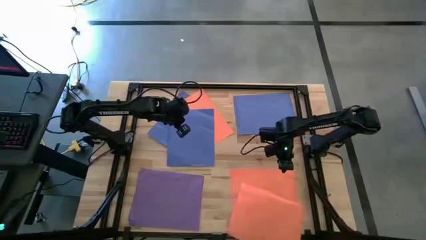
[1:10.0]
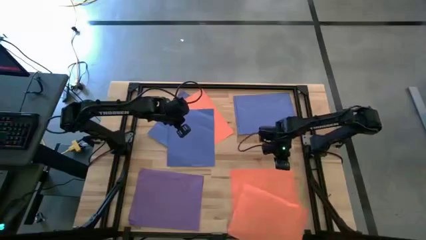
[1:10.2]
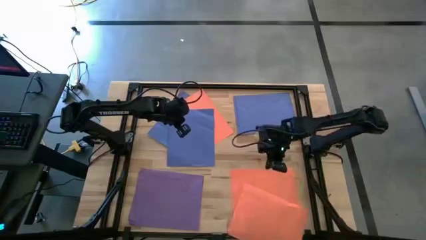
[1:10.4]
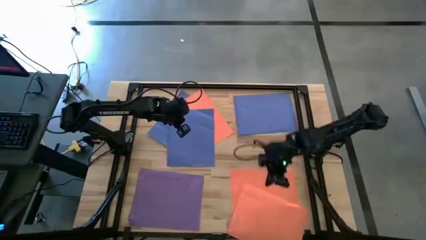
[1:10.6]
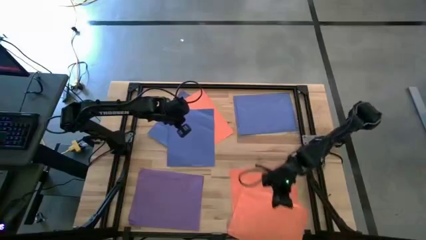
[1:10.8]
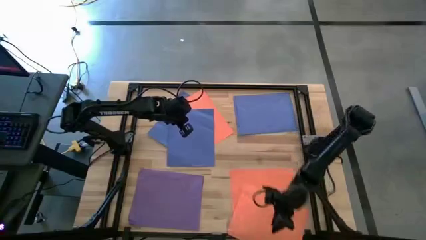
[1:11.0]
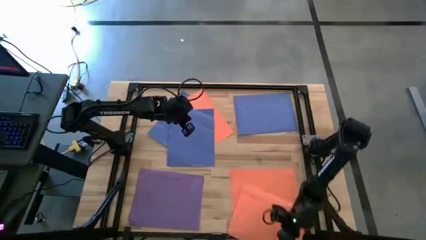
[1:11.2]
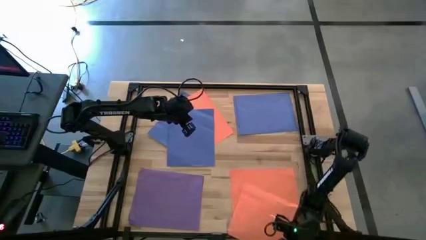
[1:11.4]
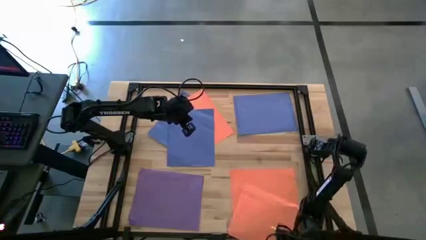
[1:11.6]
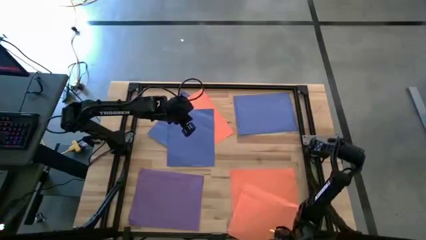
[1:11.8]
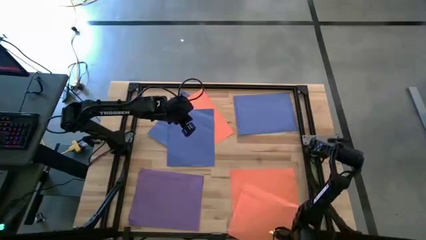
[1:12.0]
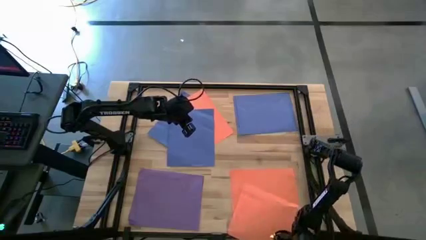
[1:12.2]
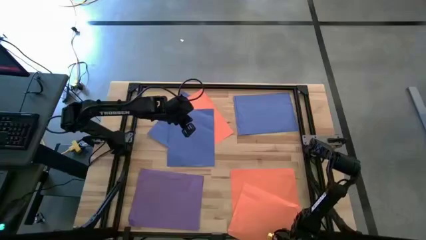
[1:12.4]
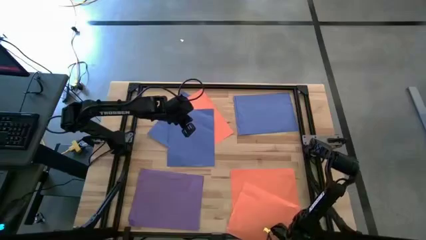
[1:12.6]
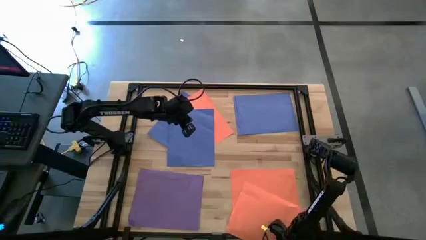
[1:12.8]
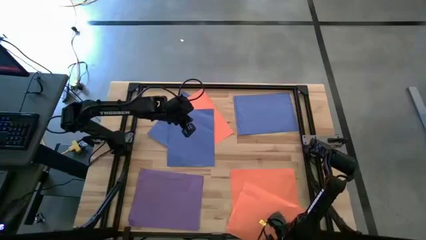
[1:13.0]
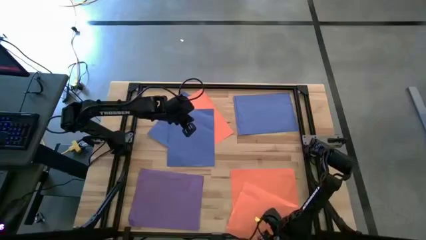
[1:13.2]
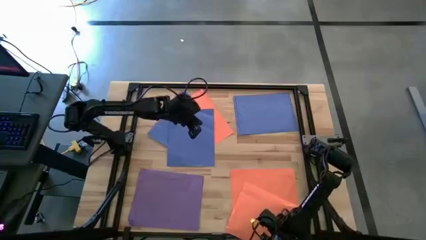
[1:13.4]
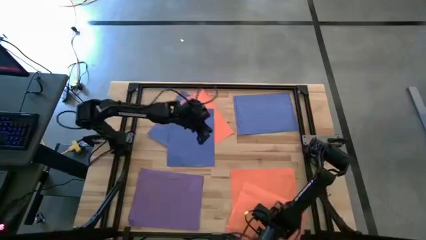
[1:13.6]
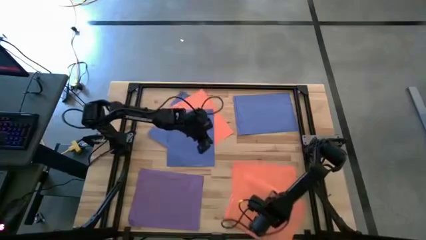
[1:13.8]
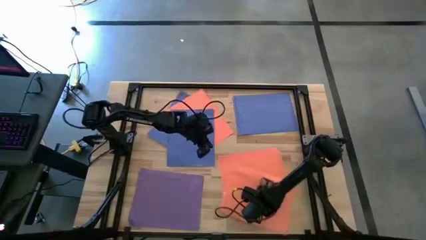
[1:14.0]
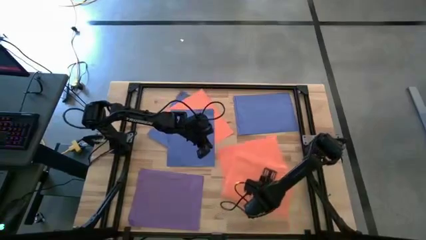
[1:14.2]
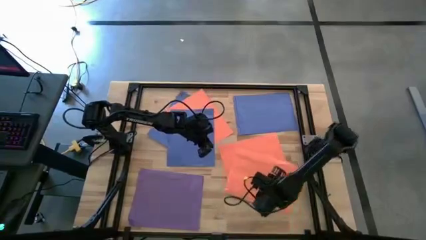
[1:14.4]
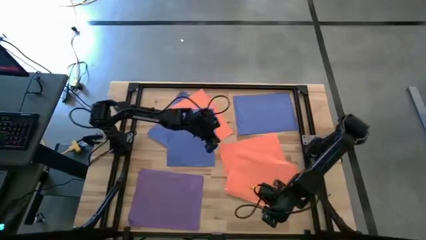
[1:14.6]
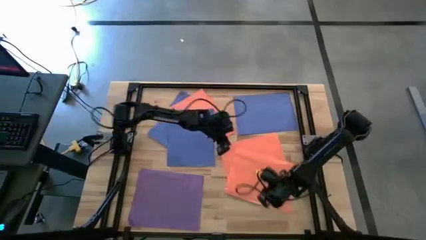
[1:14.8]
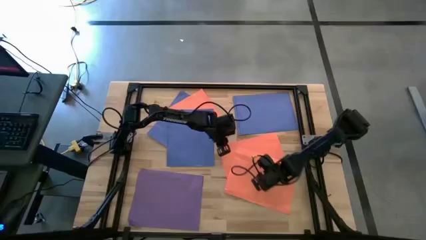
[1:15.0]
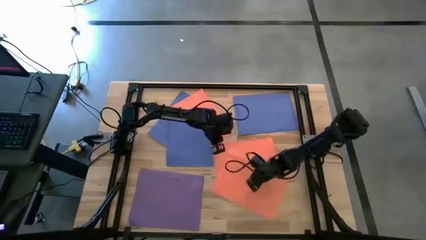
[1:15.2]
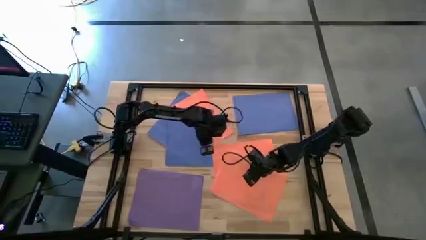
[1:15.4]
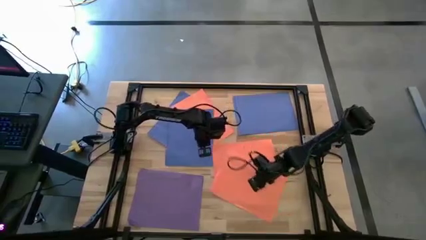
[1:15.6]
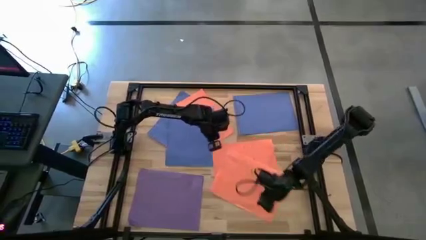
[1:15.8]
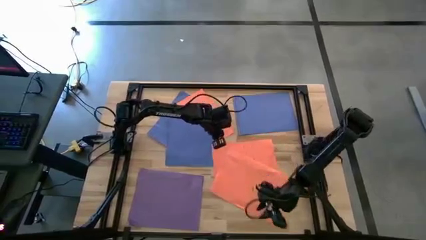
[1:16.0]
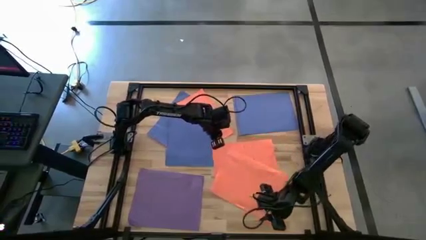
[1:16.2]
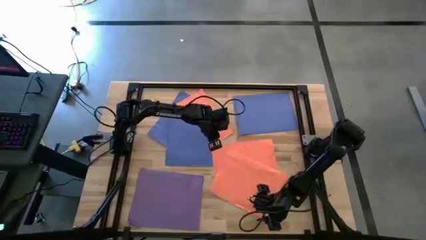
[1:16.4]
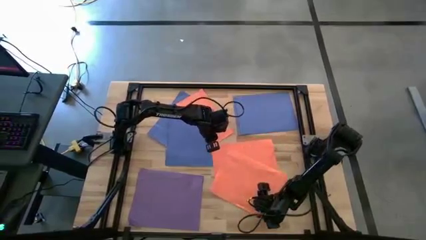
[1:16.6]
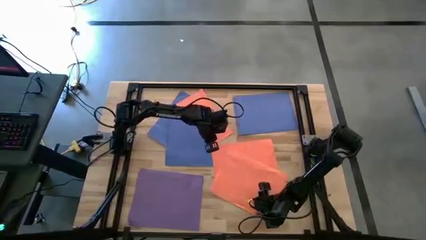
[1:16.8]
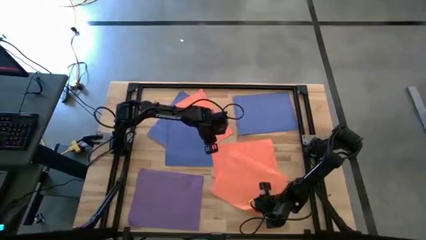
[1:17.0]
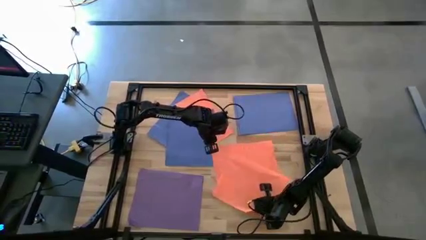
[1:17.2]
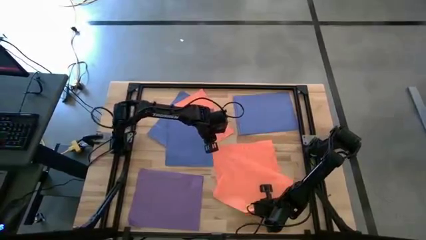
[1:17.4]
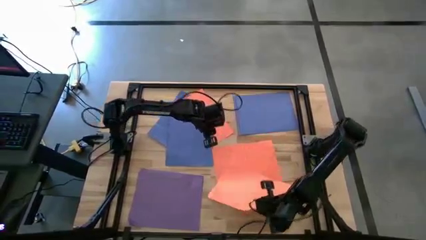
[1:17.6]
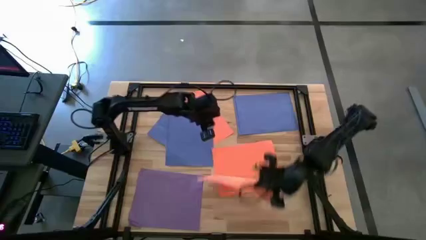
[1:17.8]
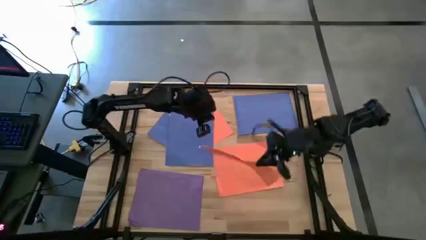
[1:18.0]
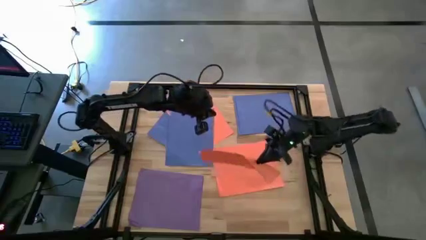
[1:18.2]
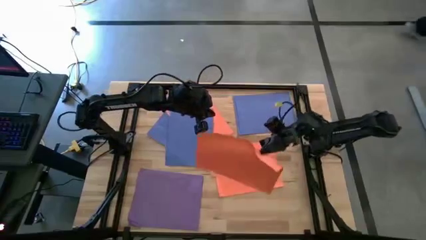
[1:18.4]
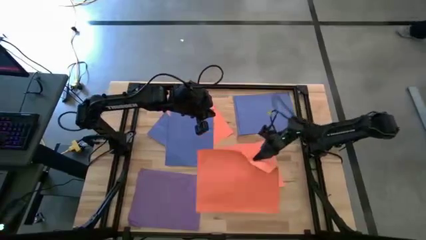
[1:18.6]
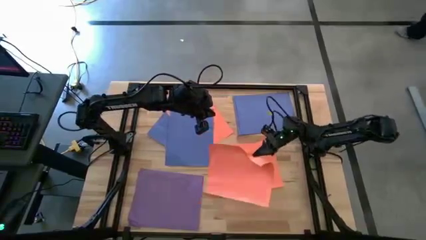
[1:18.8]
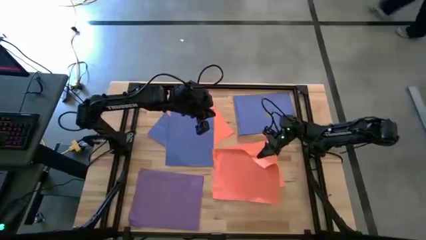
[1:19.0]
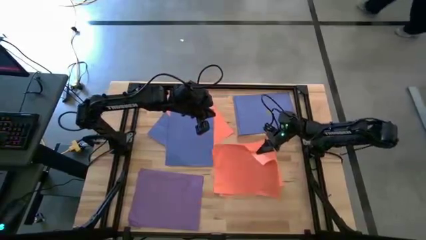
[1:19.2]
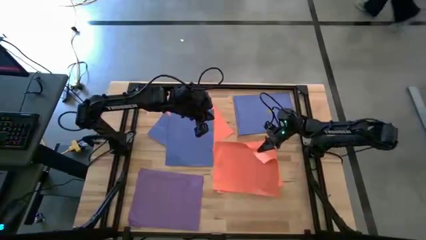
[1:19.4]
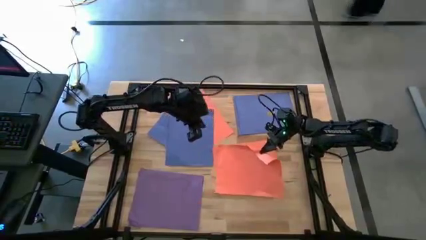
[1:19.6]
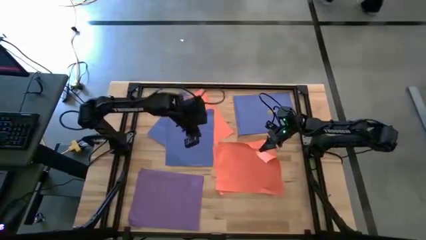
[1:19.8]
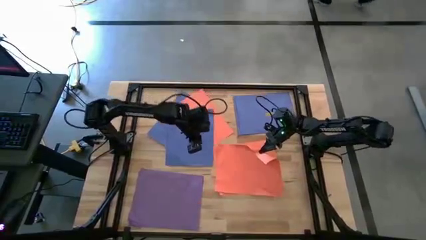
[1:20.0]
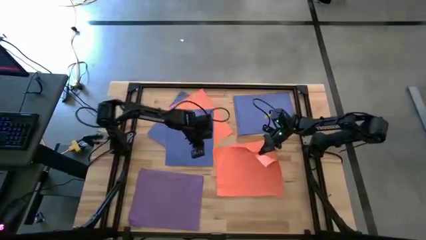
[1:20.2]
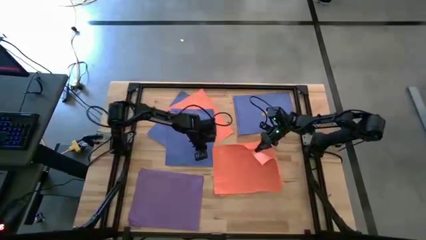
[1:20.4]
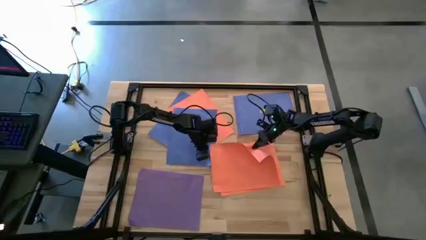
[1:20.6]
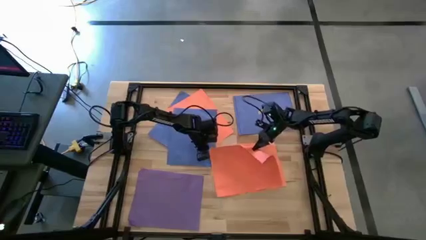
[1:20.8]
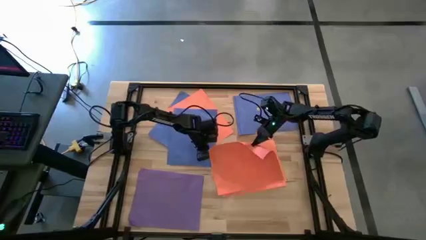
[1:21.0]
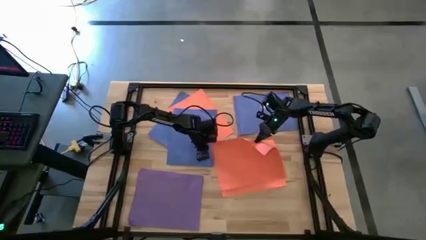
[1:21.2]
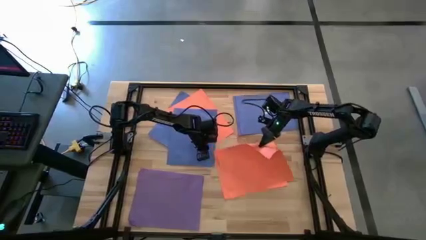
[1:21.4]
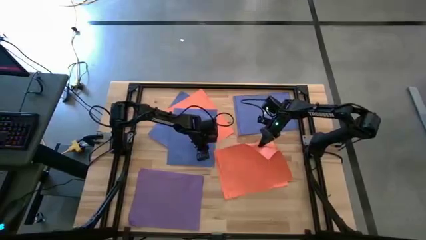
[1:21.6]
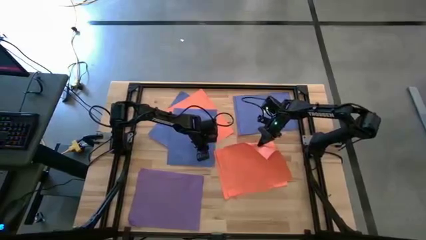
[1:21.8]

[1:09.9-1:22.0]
Task: Organize paper
Stack the orange colored paper on top of the orange colored paper

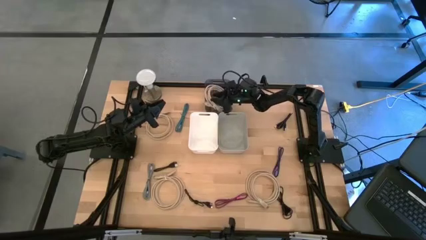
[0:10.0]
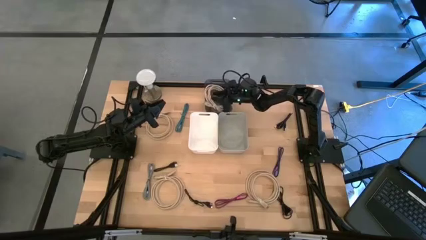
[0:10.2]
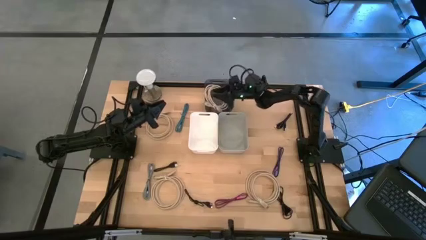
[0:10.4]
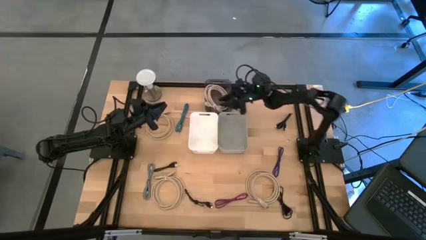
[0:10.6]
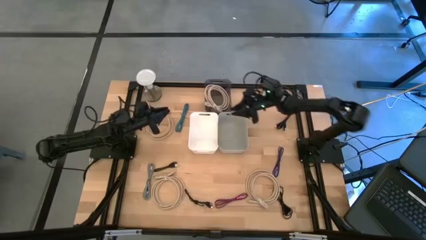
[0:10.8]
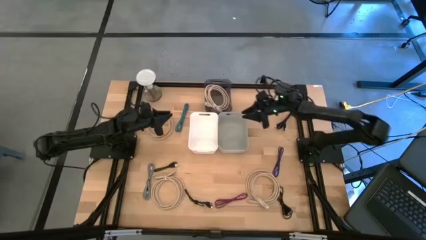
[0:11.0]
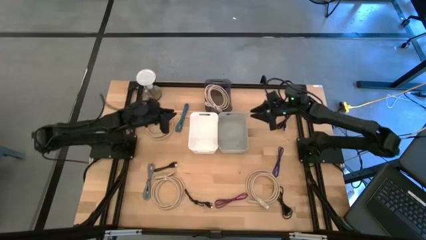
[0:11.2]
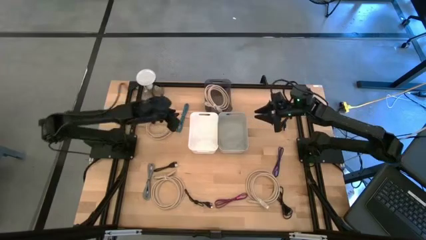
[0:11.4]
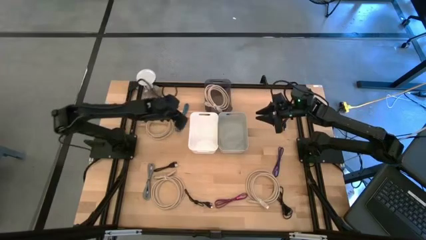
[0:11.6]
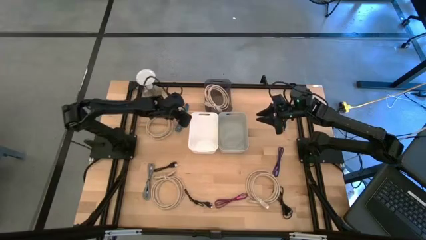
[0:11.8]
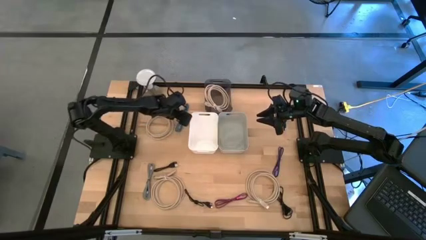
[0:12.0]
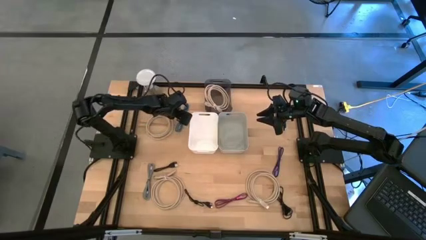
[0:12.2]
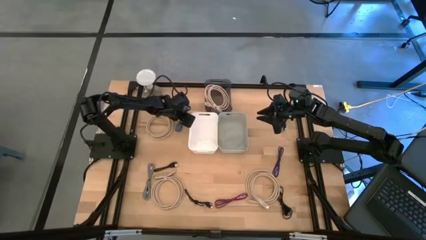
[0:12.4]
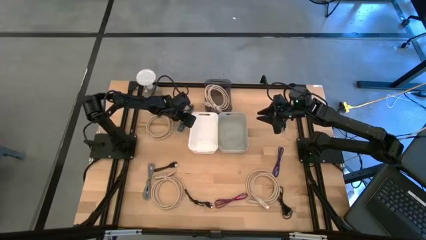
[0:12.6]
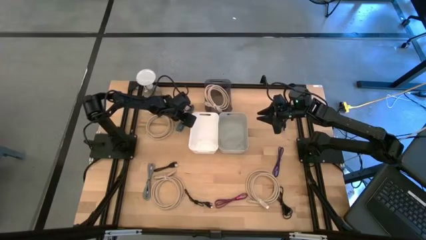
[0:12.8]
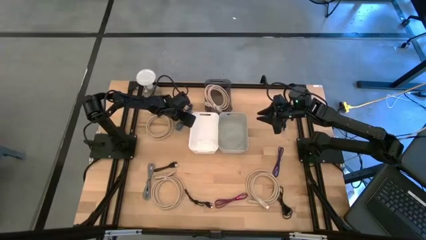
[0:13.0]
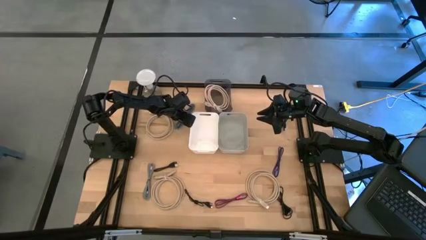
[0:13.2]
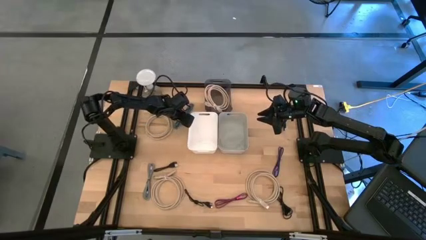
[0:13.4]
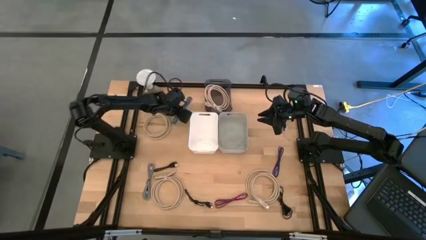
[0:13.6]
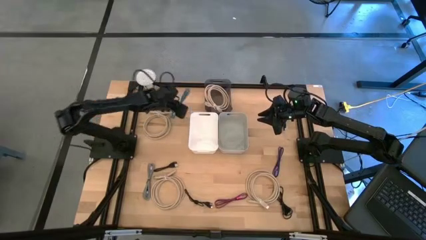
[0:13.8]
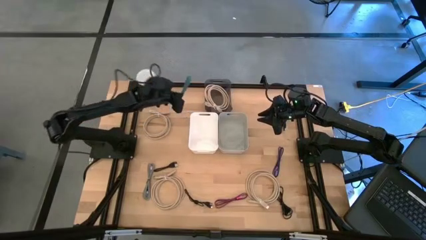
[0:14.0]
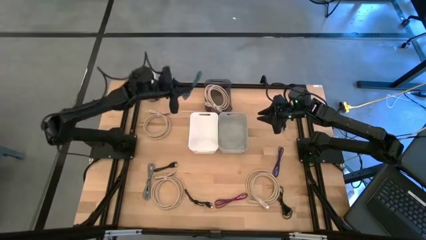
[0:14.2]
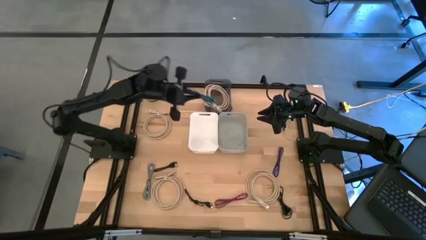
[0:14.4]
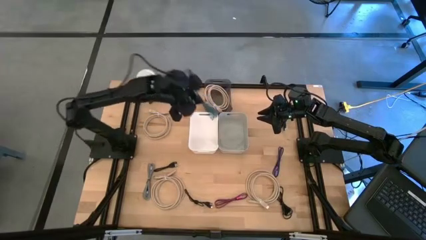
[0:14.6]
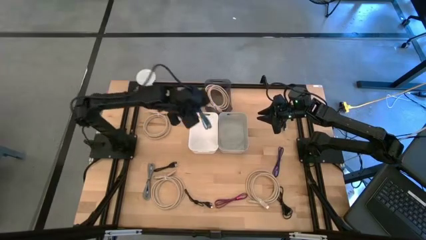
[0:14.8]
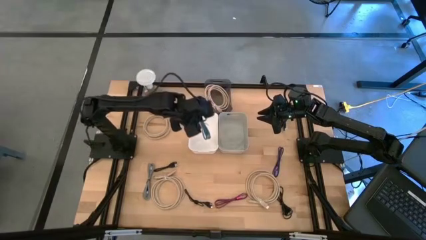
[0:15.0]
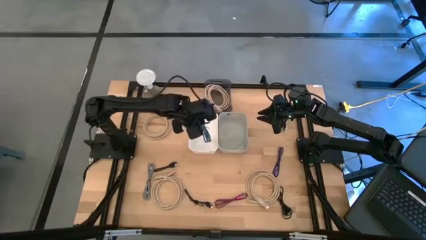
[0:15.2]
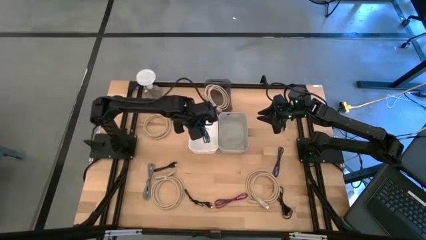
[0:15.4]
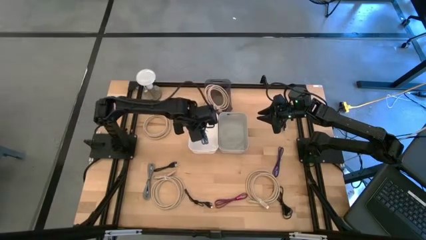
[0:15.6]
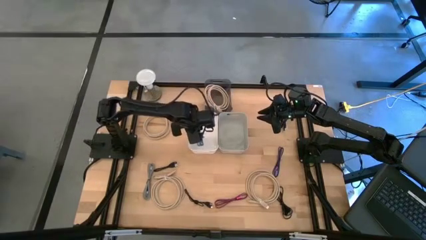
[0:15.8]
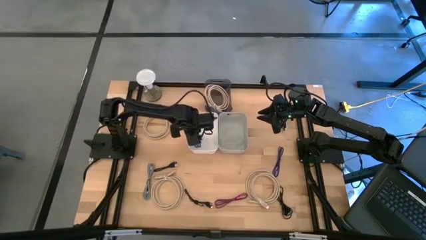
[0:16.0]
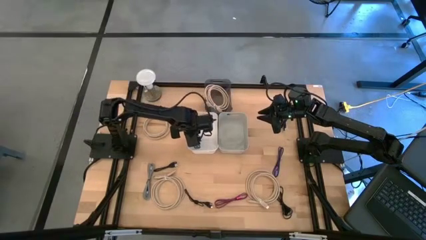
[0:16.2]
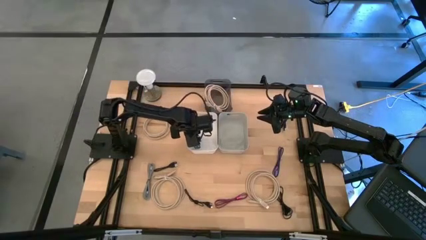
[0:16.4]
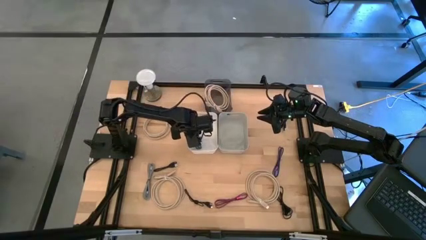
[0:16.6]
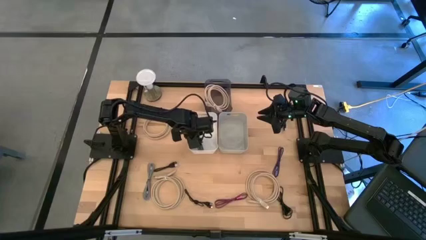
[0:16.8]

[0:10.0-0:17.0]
Task: Pick & Place USB Port
Put the blue and black charger cable into the white bin
